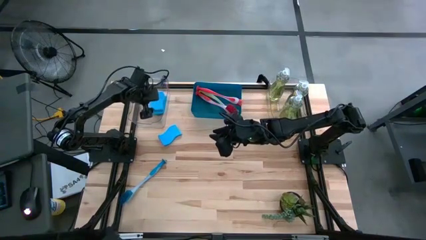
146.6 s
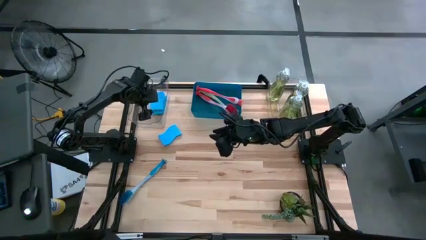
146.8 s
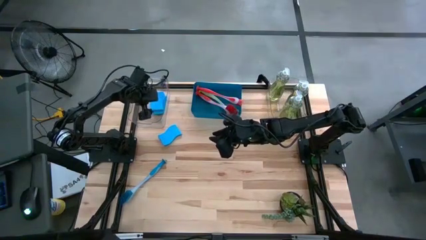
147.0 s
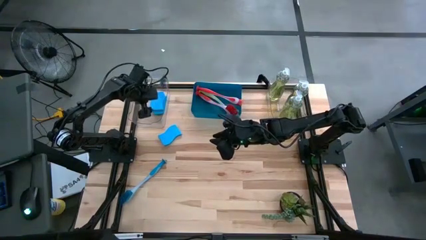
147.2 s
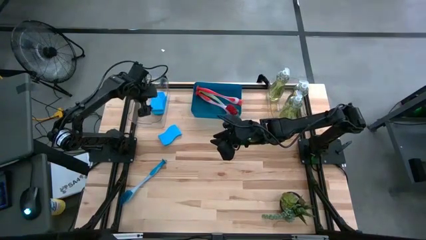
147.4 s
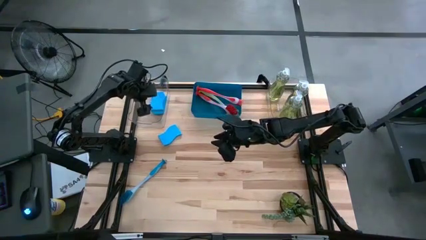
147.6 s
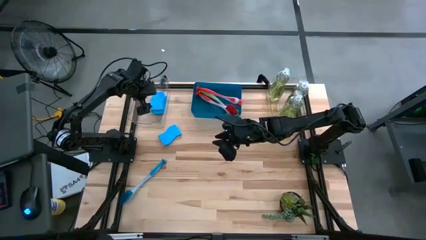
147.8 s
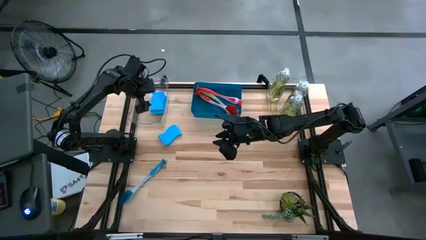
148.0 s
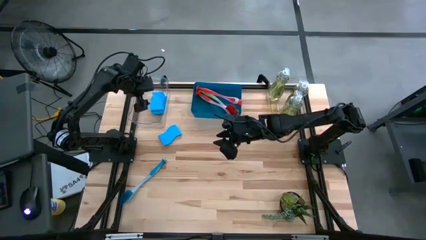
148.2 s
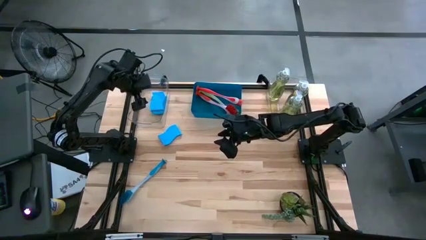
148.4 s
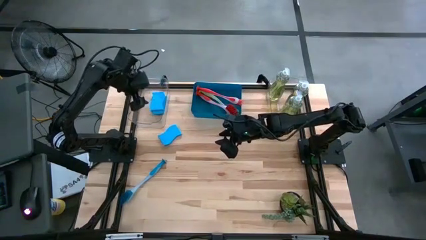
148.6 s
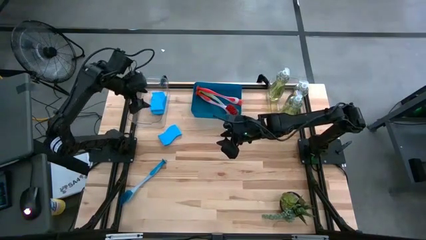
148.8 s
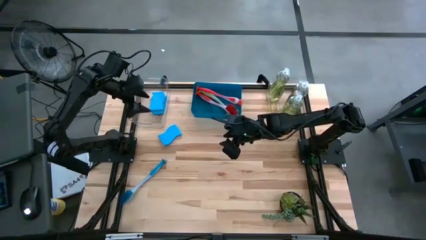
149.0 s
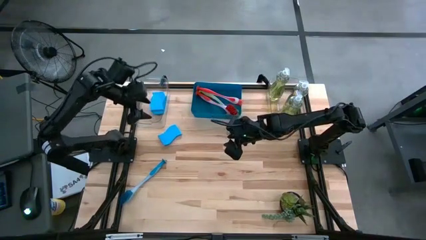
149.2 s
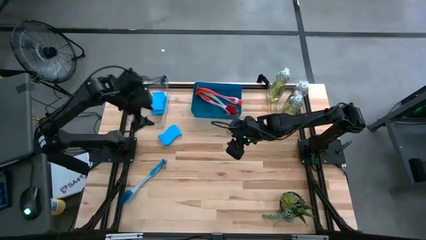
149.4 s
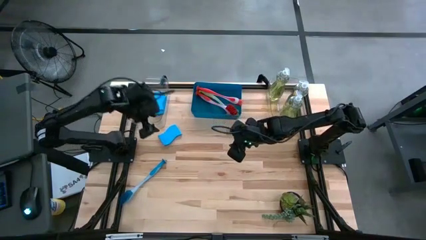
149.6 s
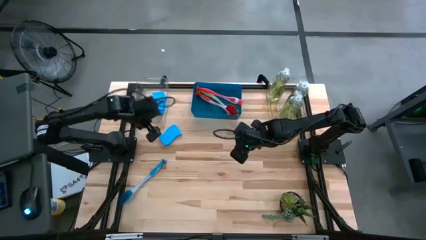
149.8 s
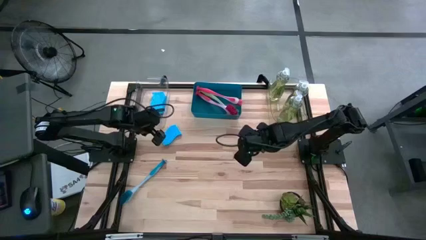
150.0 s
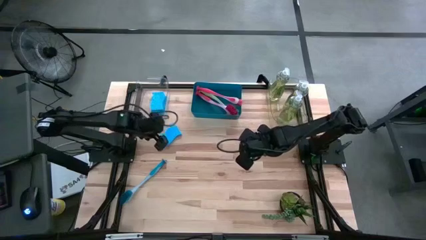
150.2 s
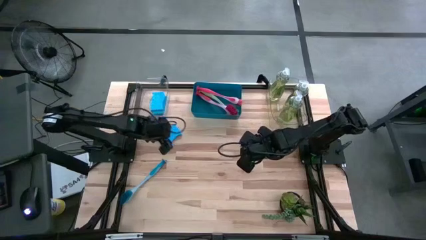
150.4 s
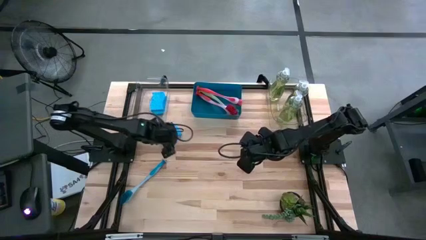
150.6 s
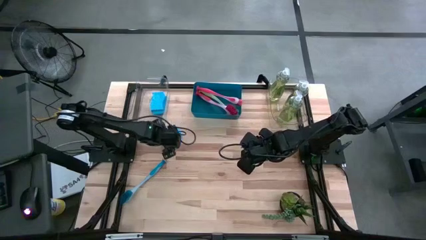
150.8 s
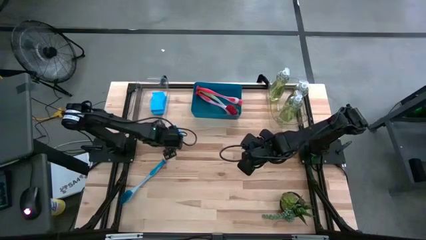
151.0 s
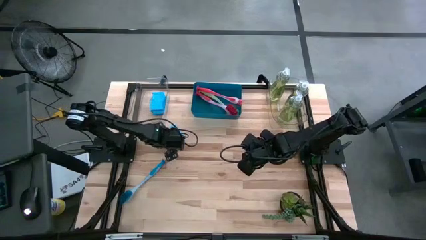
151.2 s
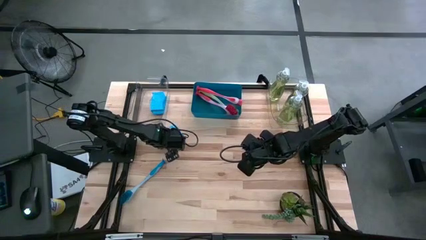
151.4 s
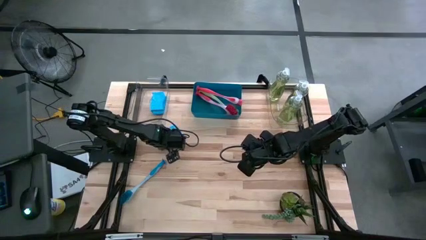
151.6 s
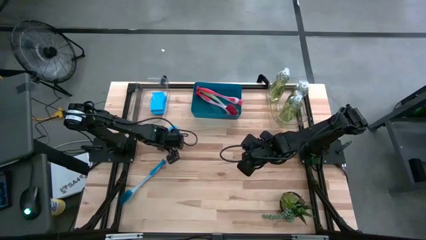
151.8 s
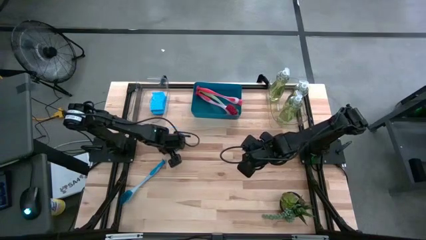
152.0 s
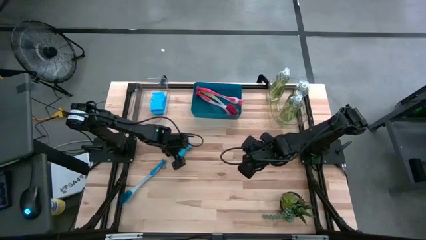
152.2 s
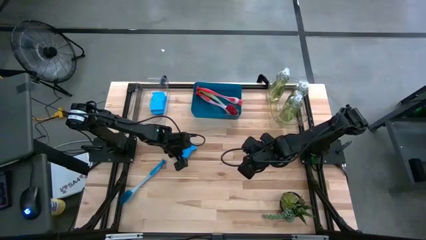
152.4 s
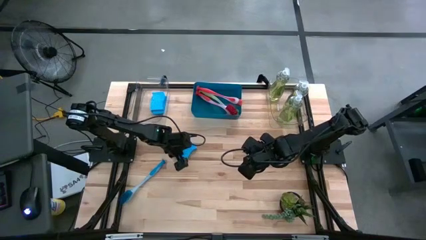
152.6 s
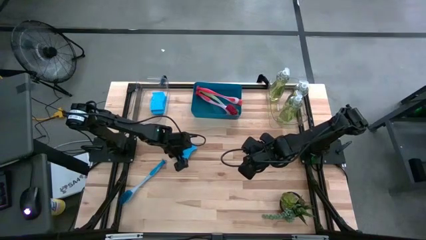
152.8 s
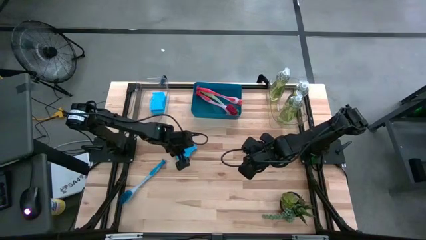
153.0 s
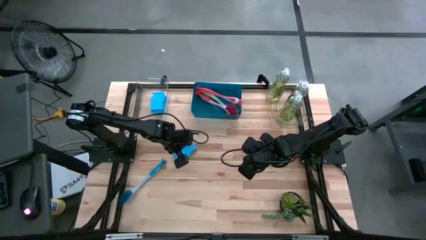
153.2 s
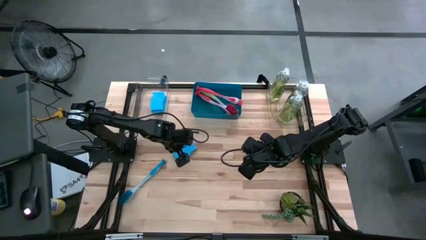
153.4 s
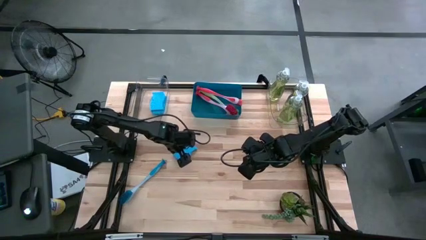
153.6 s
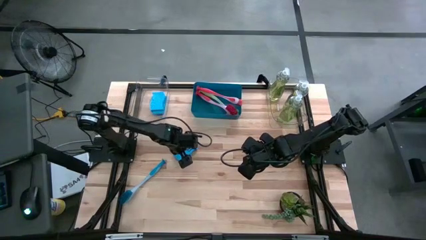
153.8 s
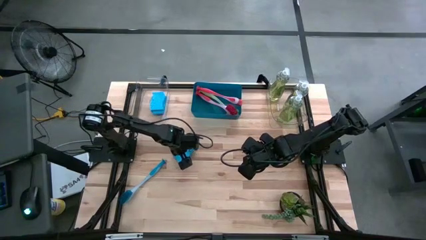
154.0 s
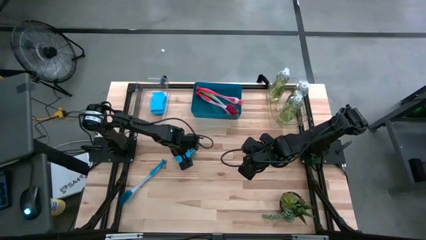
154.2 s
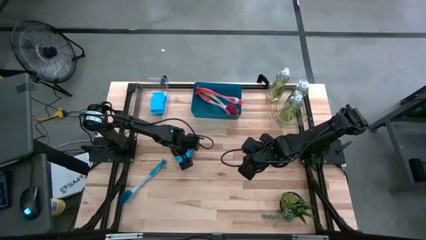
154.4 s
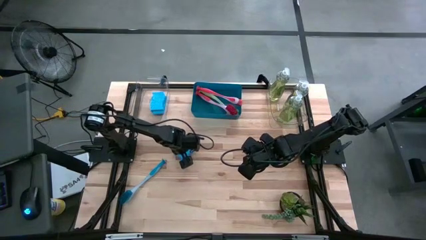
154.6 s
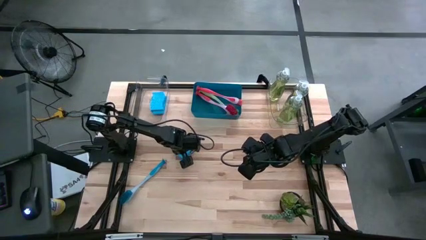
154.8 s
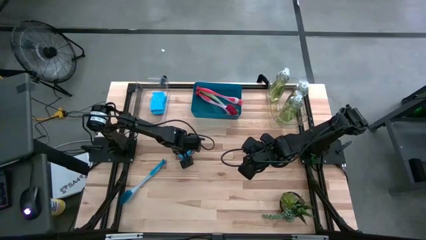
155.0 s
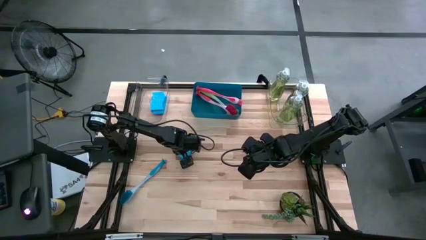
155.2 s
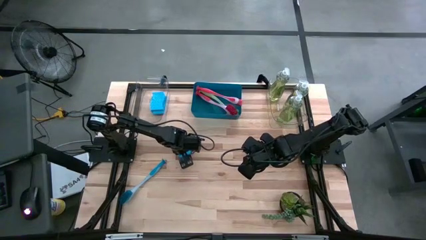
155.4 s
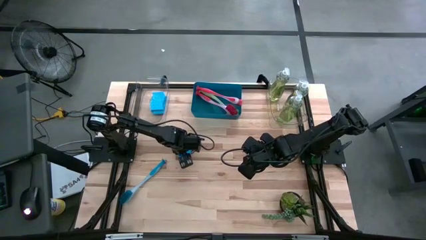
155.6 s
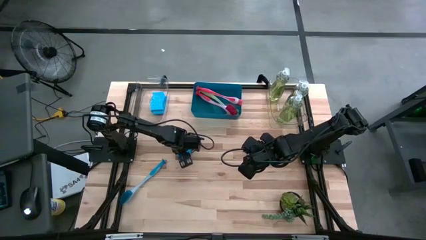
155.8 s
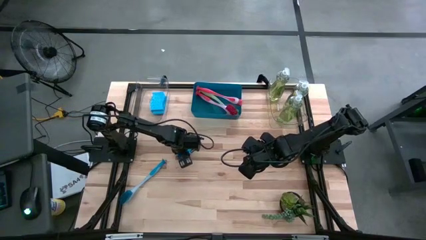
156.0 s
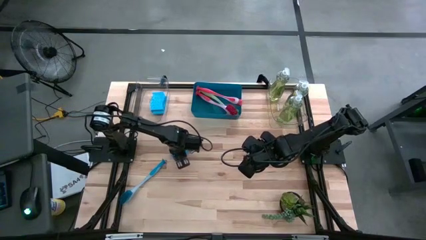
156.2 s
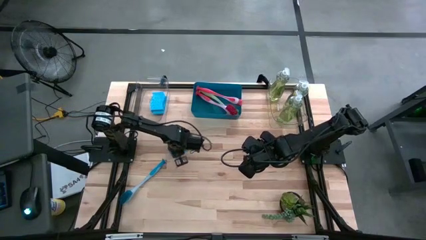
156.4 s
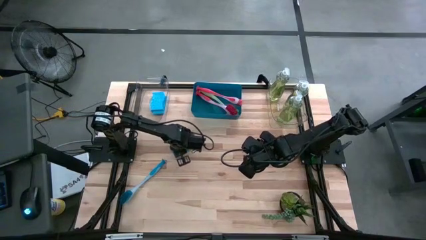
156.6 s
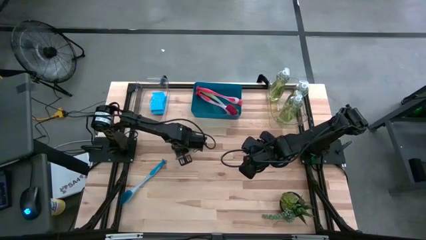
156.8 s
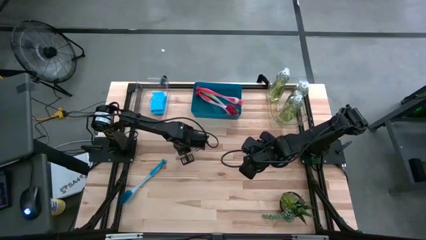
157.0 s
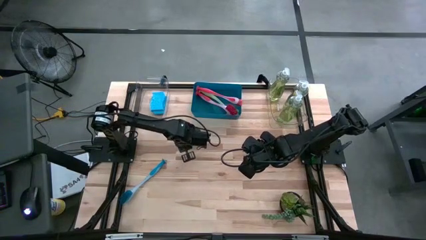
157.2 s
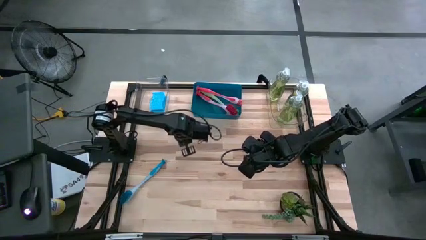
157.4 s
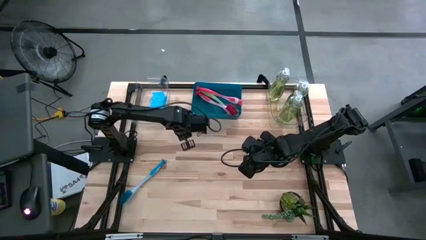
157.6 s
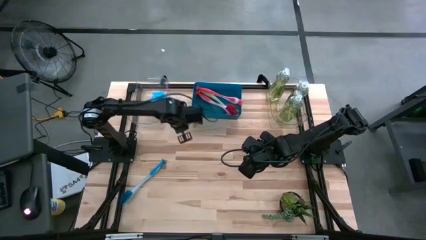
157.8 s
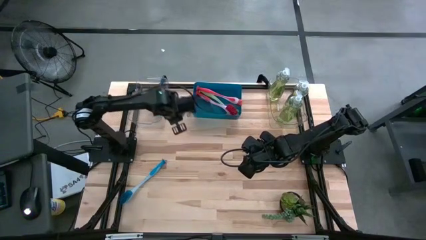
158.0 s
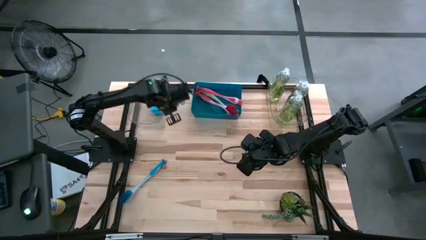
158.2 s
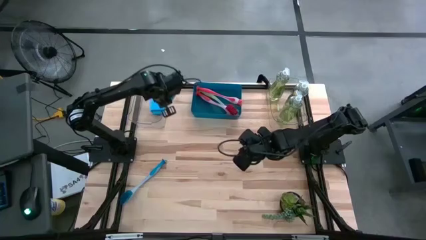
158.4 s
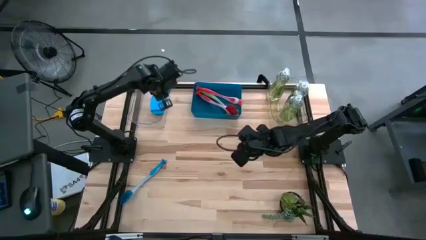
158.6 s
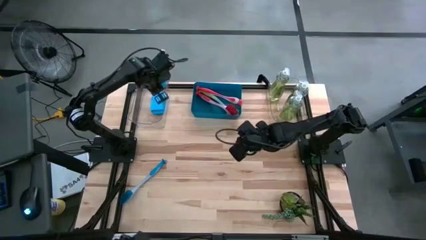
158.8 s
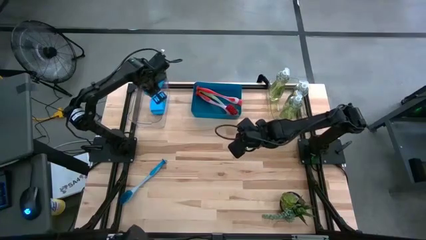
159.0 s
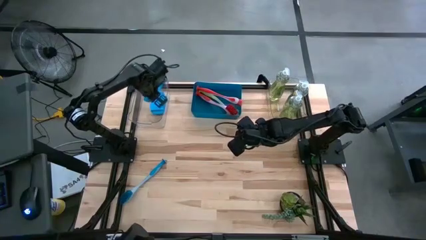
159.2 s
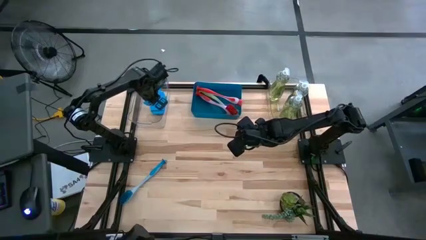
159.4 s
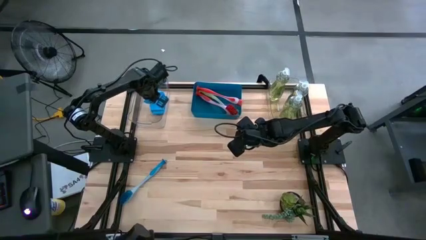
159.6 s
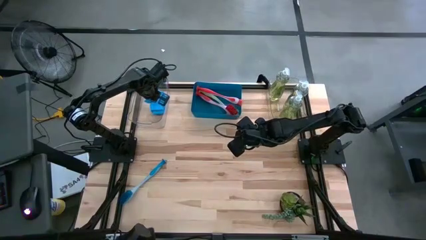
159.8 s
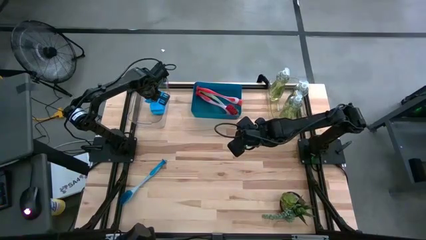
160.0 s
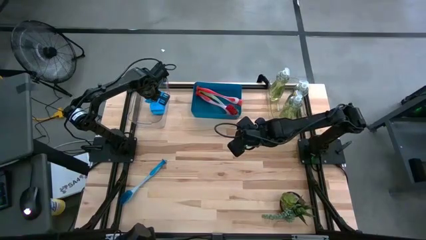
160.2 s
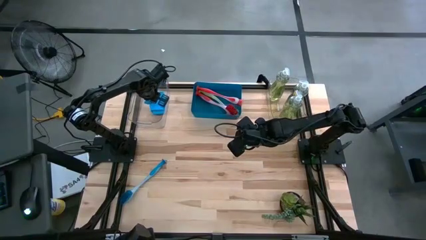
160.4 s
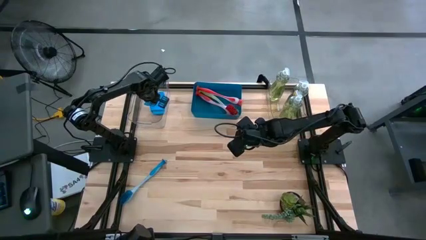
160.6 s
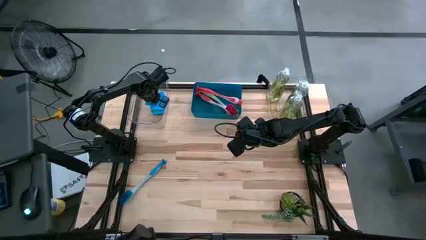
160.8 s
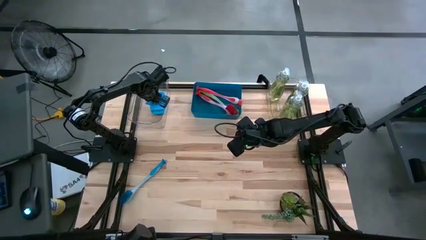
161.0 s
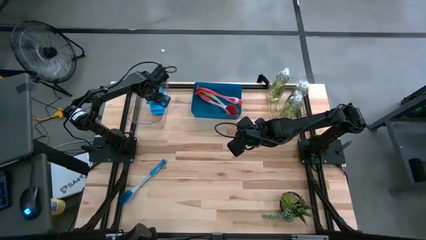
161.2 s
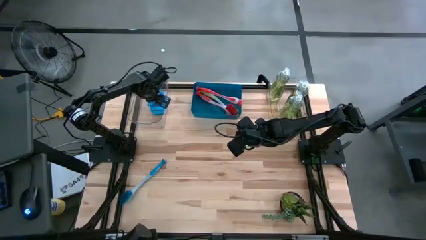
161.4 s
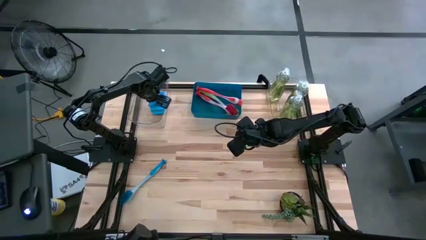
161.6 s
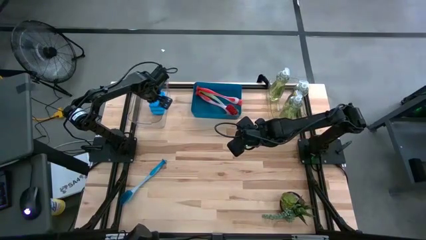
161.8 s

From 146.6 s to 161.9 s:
Task: Pick & Place Kitchen Sink Supplies
Put the blue sponge into the left transparent bin

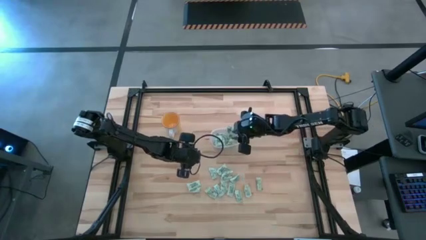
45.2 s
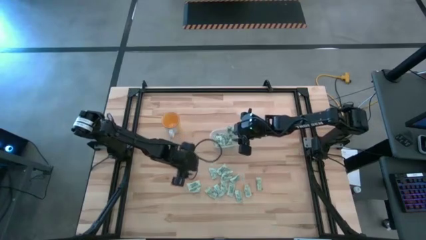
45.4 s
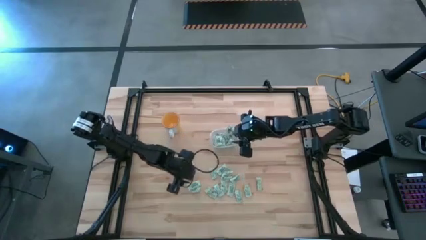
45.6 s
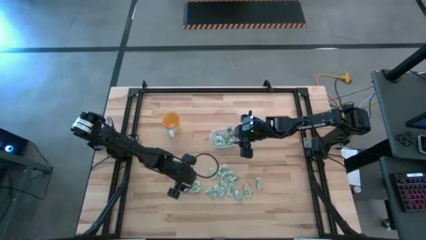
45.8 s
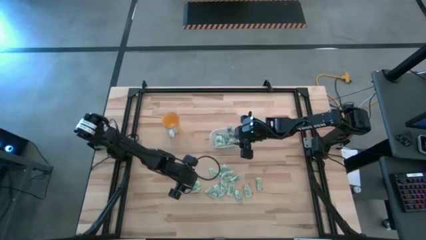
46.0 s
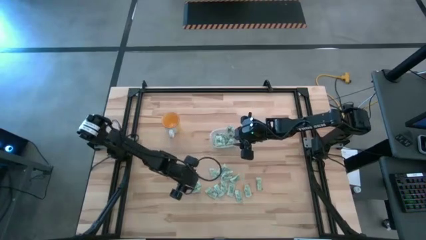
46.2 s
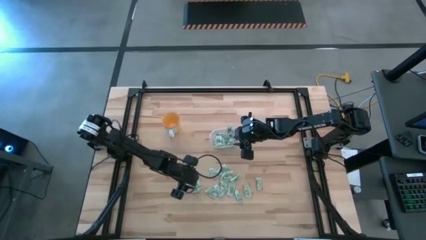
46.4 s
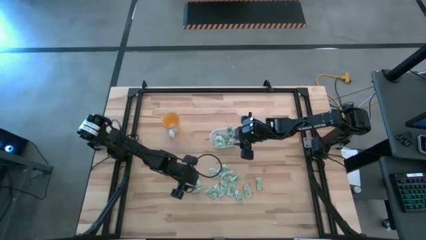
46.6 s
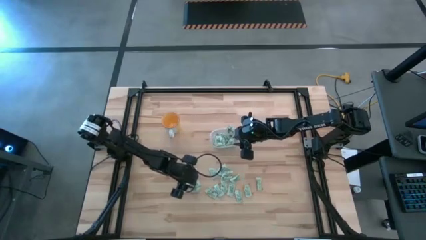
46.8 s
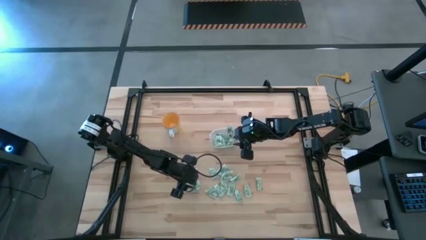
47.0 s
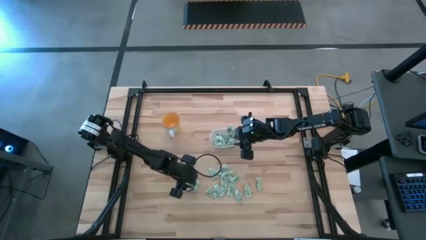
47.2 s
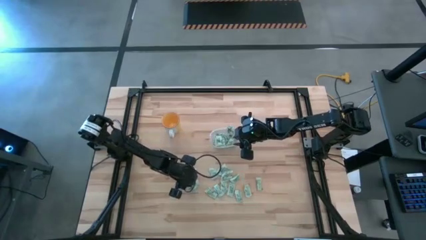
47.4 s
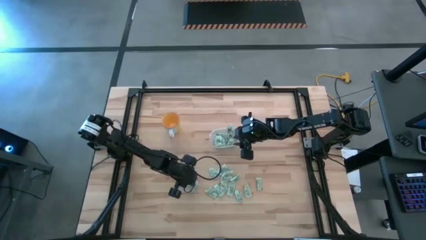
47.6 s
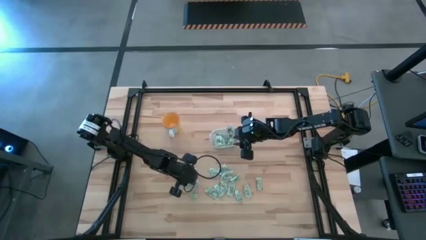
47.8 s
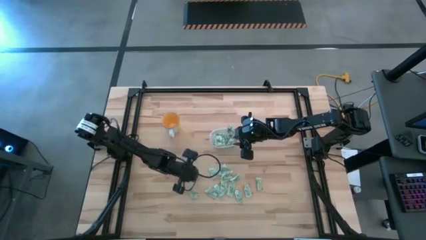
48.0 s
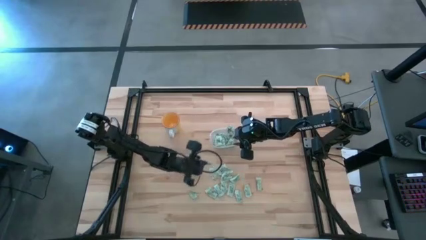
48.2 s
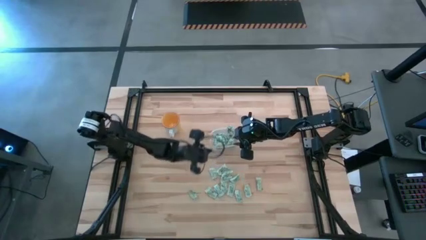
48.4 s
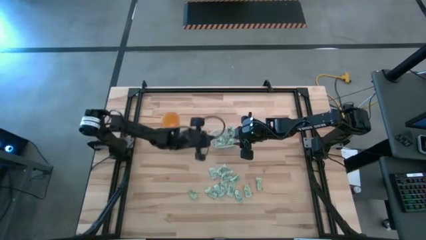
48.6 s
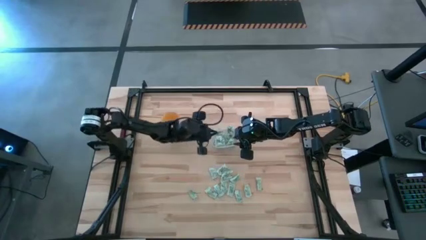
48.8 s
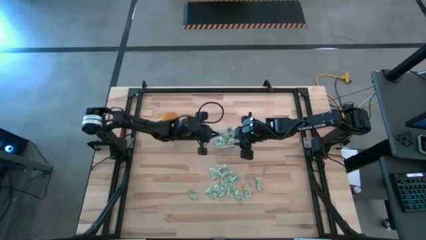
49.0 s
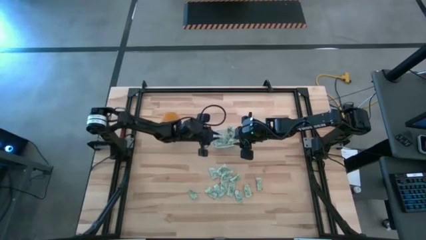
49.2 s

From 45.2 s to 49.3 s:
Task: Pick and place Stevia / Truvia into bins
Put the stevia packet into the transparent bin
